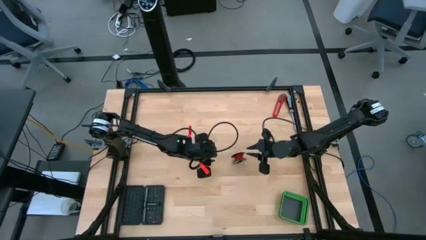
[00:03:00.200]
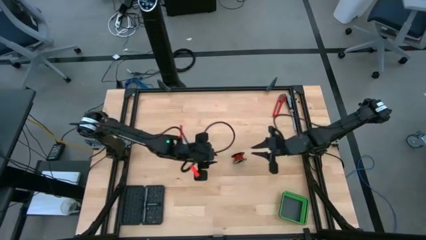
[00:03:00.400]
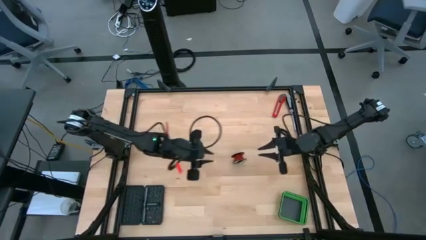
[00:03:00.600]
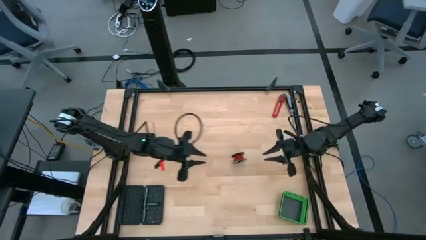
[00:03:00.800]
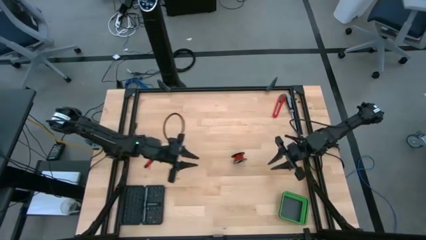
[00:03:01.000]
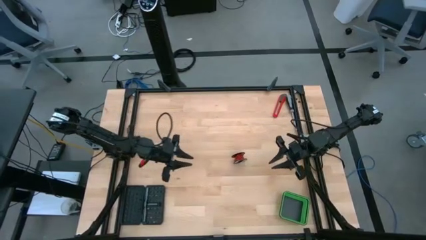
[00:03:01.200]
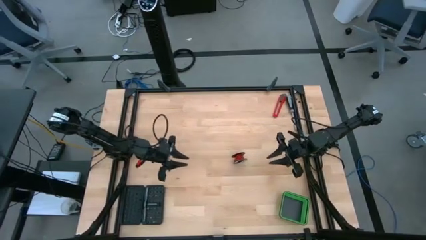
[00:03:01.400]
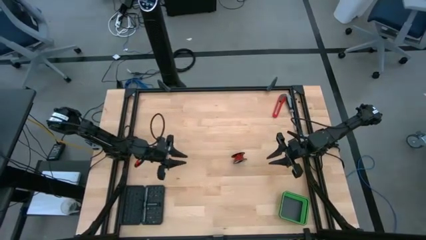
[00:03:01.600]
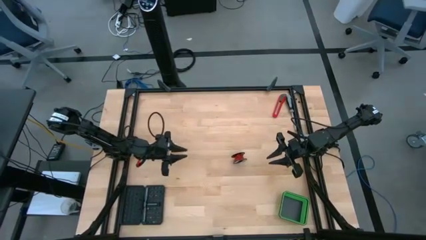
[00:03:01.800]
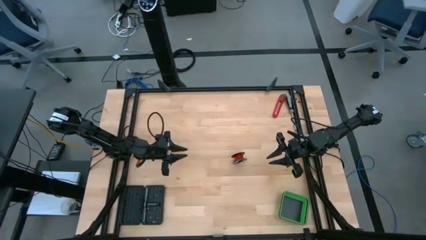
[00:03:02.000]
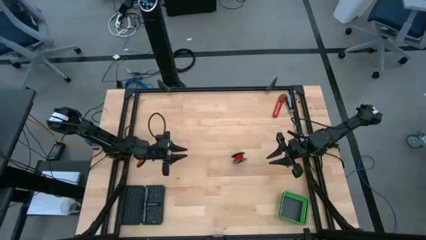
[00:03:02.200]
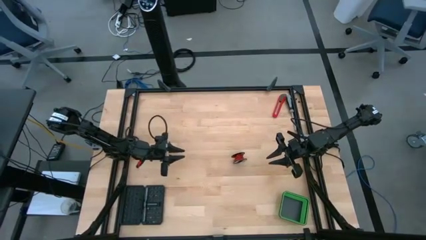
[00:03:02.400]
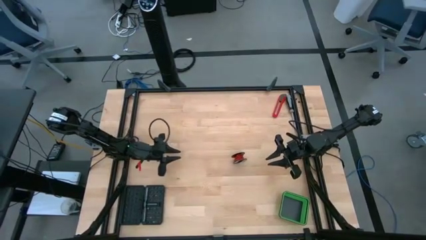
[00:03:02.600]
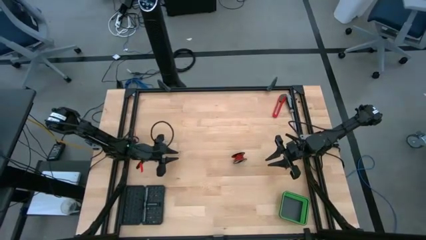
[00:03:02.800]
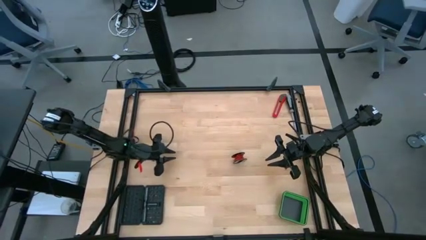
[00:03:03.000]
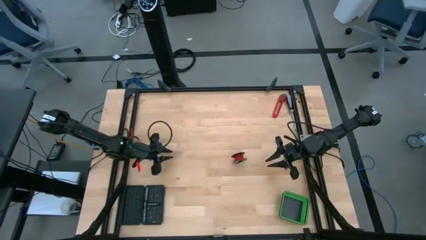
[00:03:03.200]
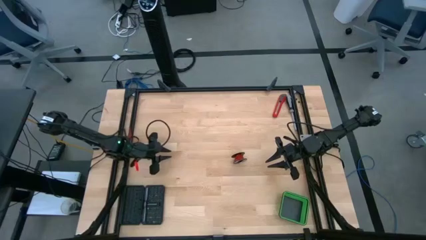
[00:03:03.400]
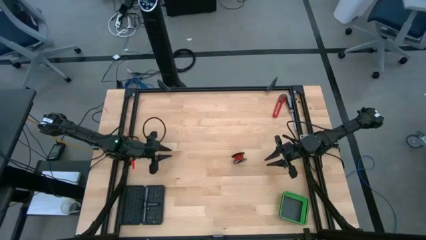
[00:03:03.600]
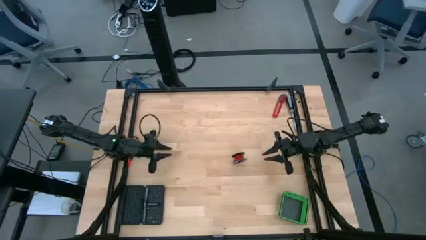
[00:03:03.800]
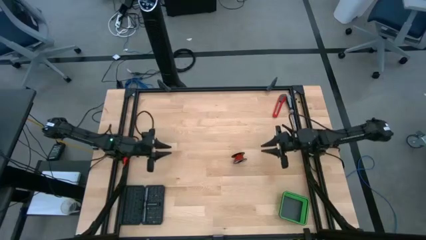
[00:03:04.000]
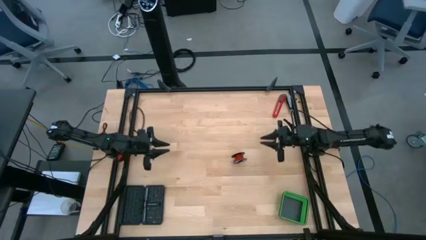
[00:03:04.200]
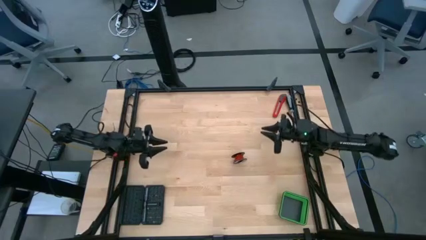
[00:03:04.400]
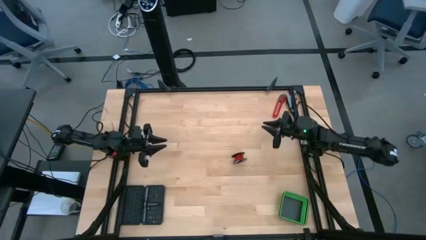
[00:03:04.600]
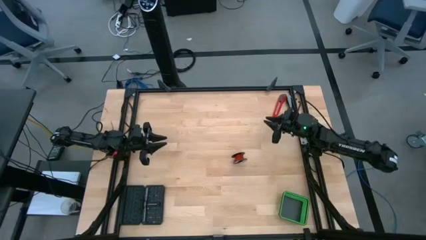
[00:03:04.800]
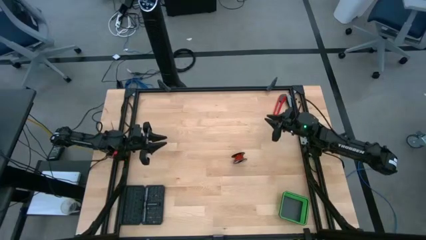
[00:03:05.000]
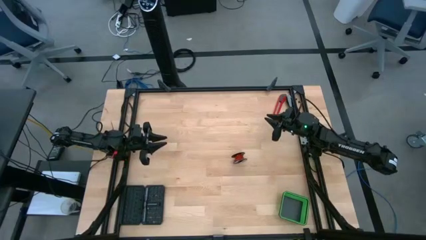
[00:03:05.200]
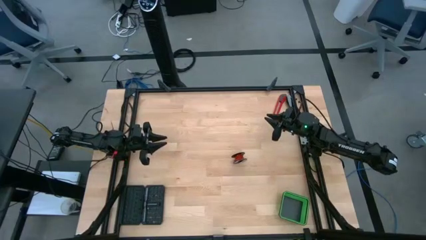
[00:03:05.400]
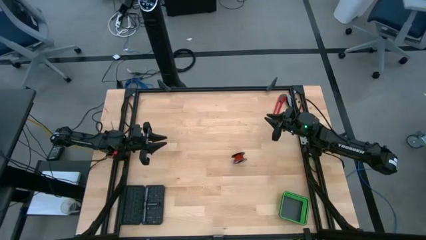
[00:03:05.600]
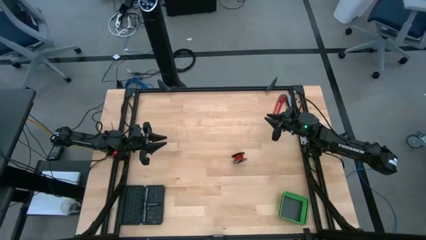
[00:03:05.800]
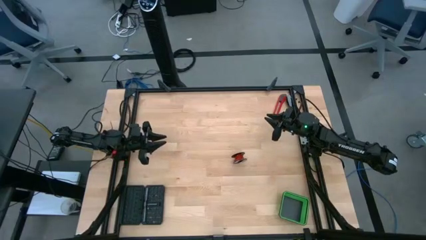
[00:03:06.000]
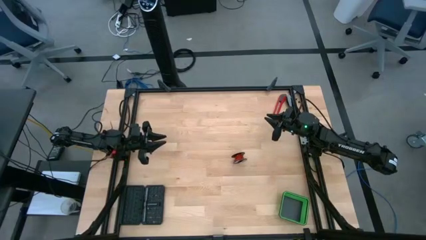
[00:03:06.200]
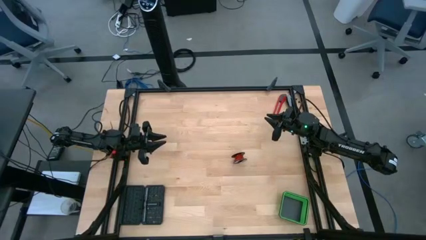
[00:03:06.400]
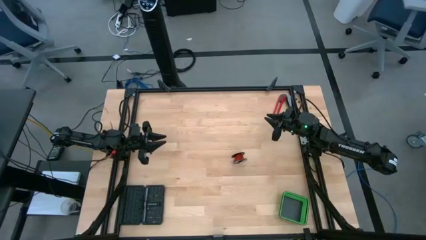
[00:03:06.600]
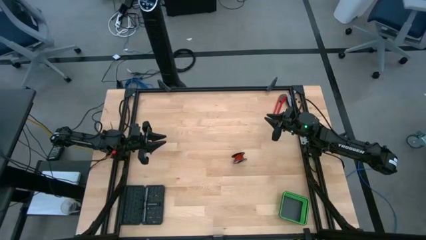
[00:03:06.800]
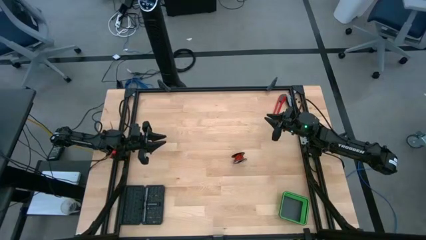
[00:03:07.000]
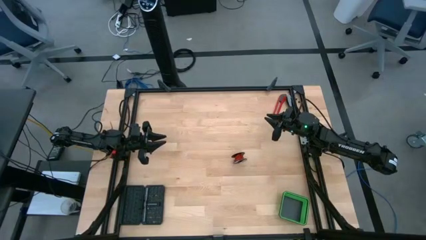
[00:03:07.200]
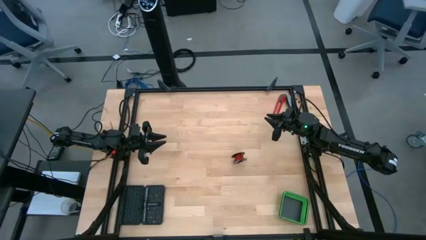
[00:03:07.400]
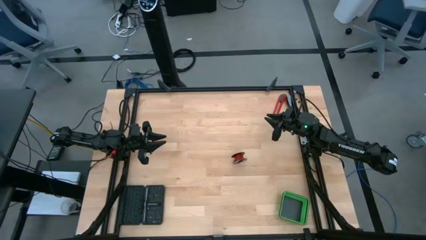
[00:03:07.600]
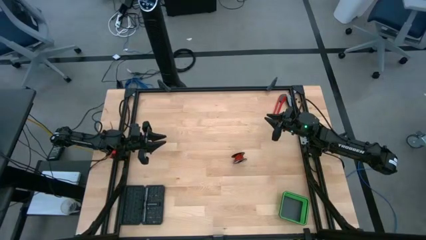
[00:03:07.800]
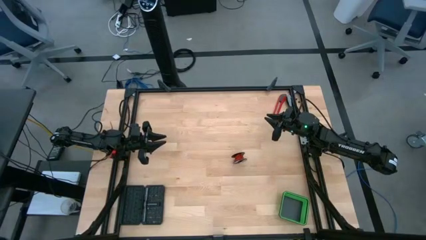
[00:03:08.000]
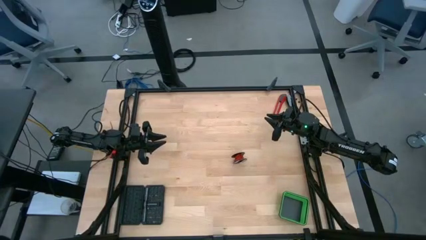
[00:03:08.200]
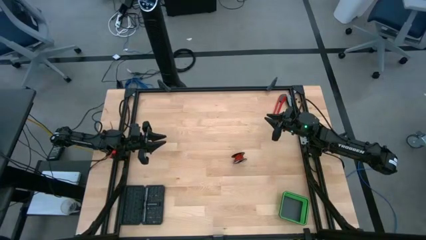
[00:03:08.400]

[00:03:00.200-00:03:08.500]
Task: Coil cords
Return to Home Position

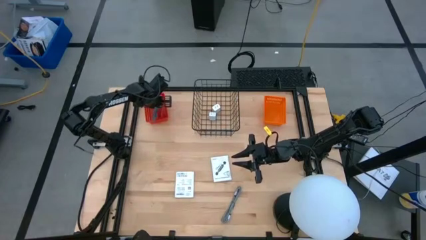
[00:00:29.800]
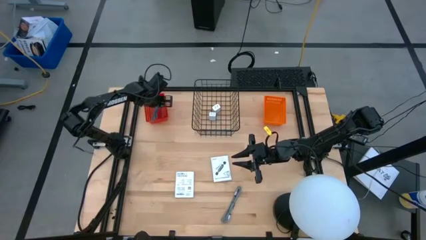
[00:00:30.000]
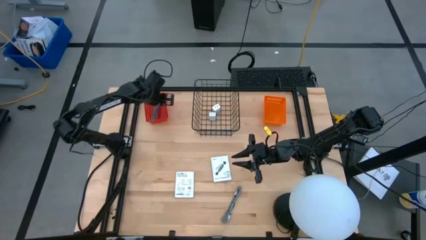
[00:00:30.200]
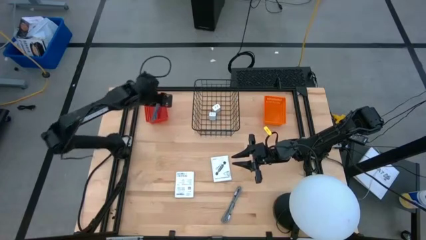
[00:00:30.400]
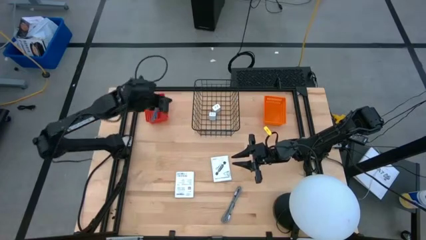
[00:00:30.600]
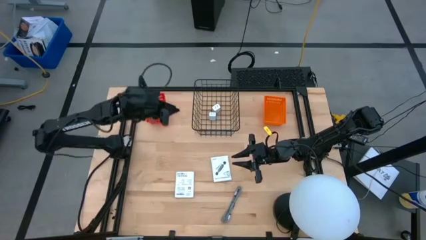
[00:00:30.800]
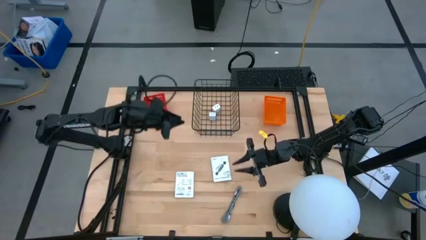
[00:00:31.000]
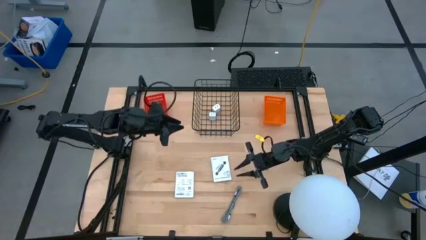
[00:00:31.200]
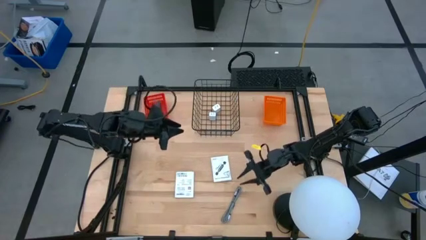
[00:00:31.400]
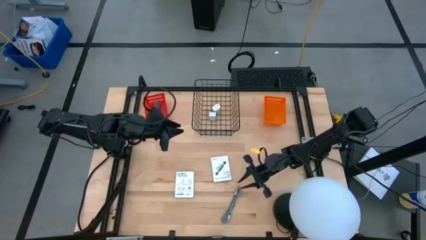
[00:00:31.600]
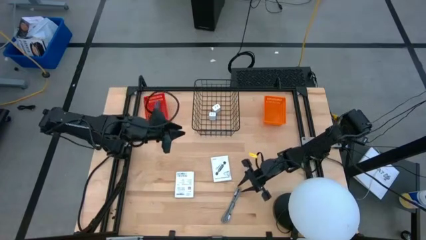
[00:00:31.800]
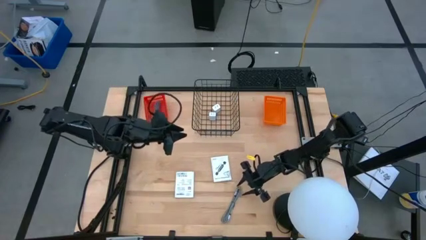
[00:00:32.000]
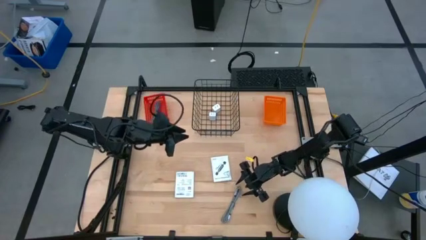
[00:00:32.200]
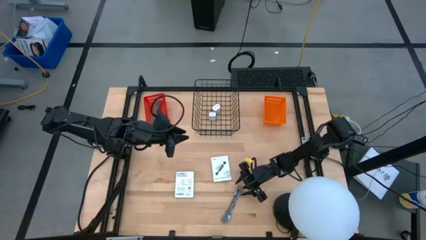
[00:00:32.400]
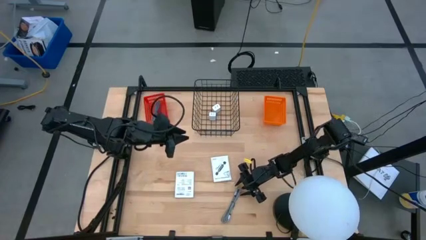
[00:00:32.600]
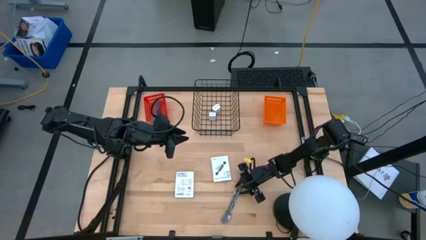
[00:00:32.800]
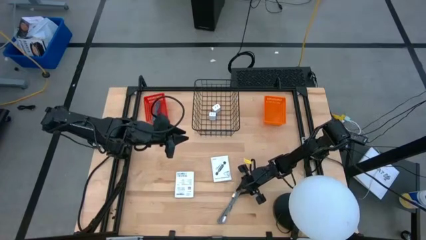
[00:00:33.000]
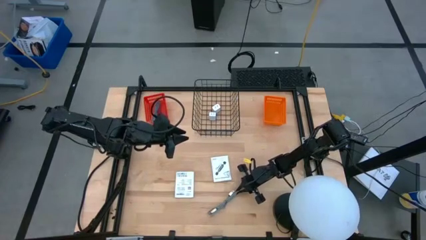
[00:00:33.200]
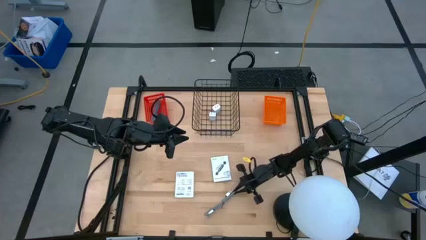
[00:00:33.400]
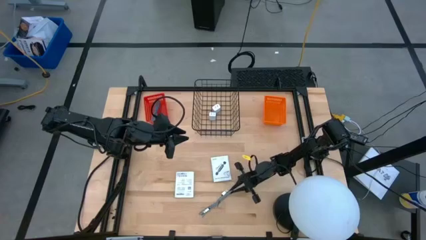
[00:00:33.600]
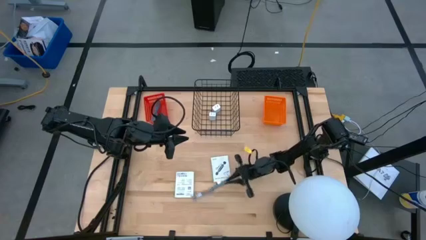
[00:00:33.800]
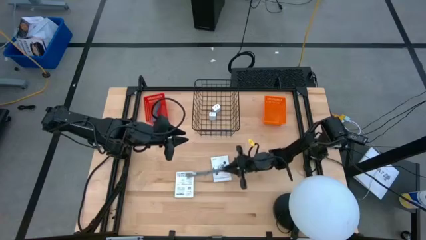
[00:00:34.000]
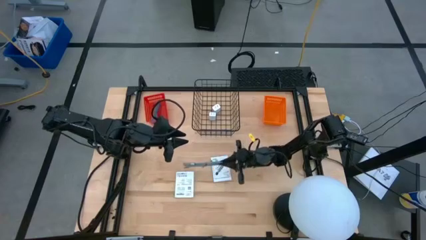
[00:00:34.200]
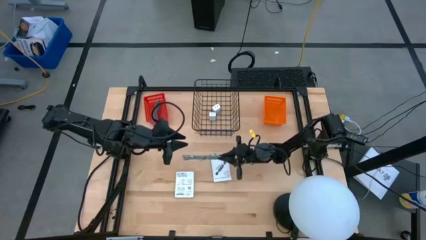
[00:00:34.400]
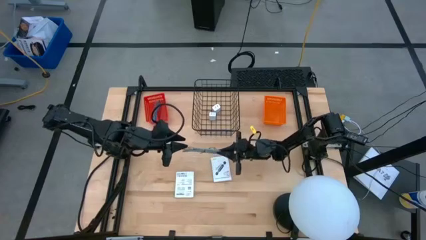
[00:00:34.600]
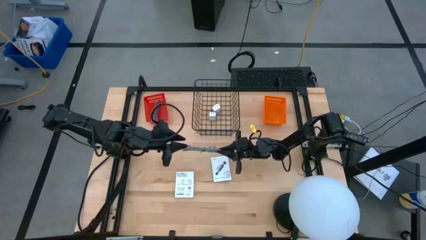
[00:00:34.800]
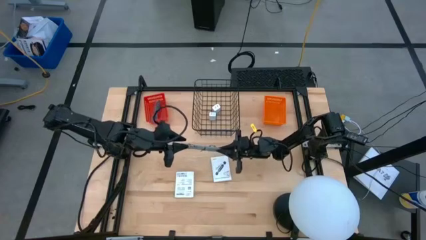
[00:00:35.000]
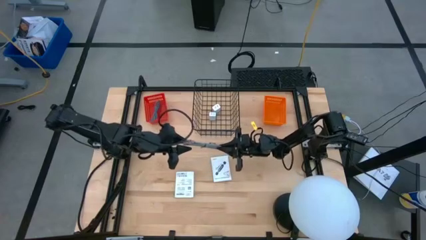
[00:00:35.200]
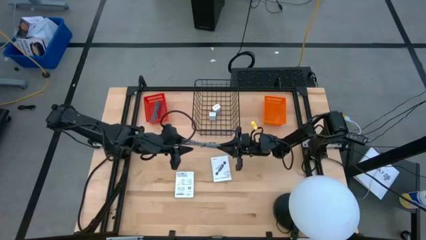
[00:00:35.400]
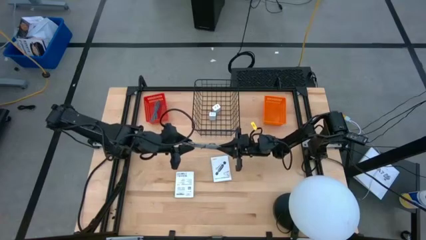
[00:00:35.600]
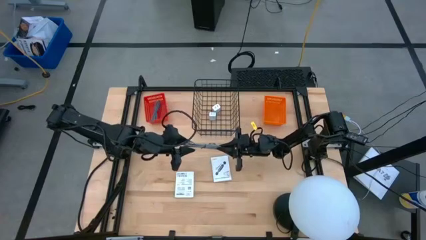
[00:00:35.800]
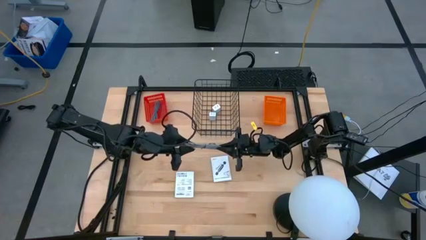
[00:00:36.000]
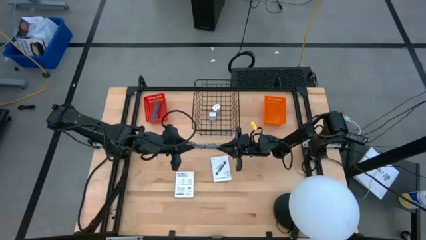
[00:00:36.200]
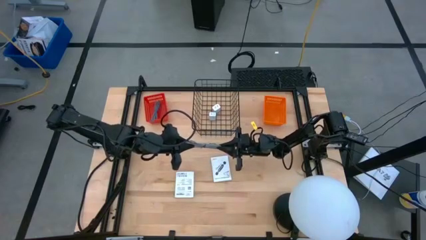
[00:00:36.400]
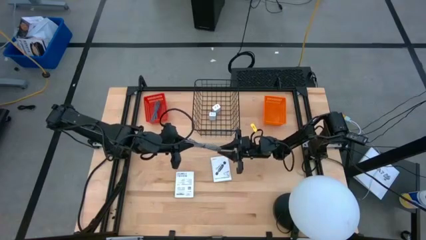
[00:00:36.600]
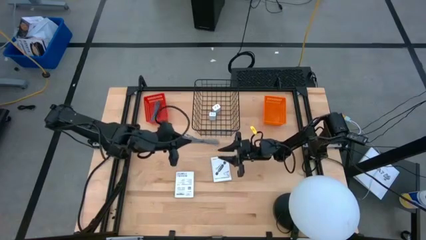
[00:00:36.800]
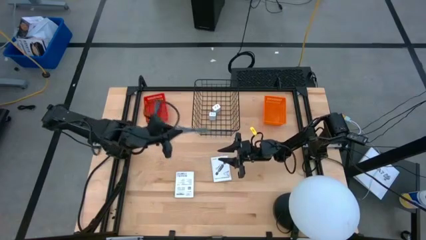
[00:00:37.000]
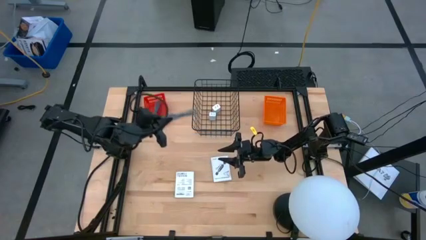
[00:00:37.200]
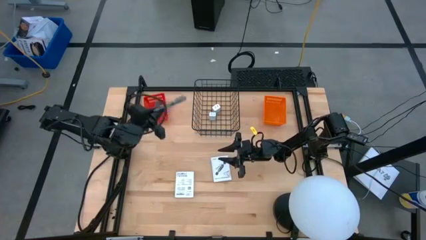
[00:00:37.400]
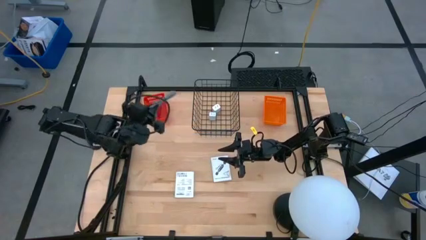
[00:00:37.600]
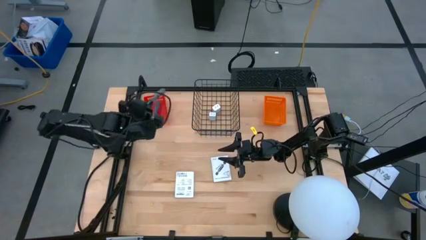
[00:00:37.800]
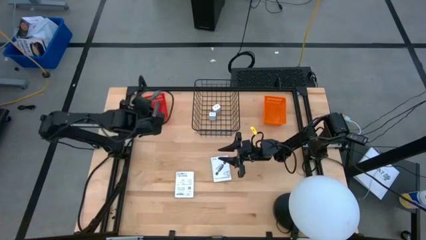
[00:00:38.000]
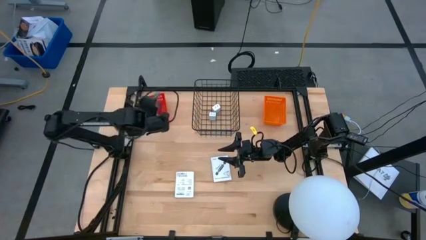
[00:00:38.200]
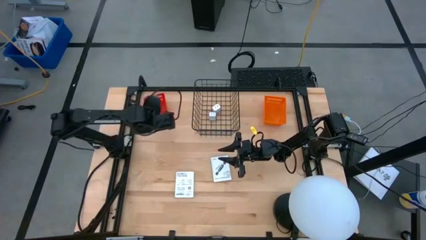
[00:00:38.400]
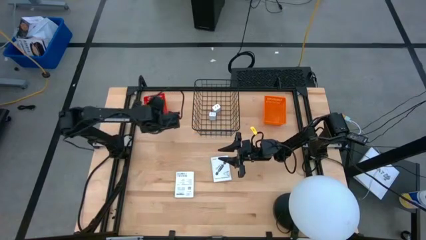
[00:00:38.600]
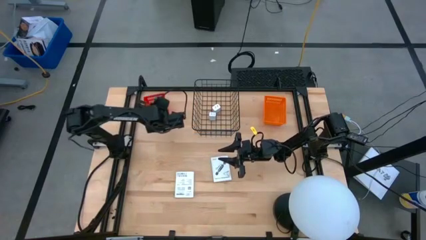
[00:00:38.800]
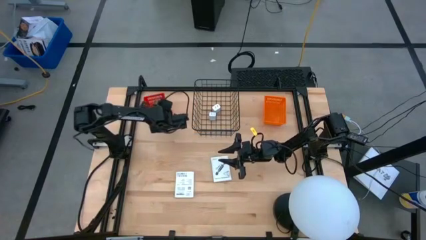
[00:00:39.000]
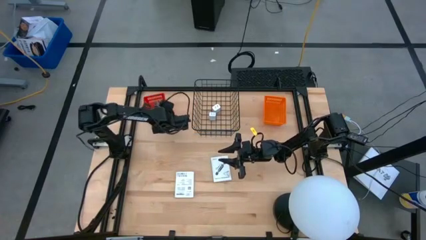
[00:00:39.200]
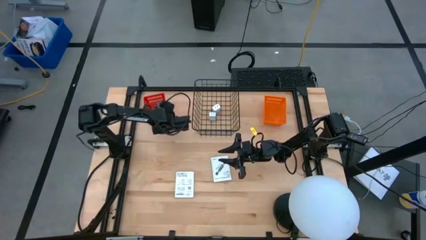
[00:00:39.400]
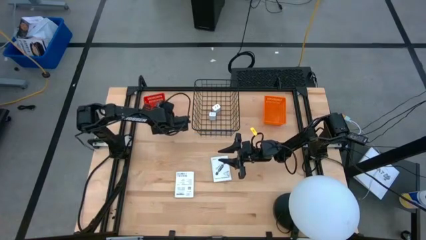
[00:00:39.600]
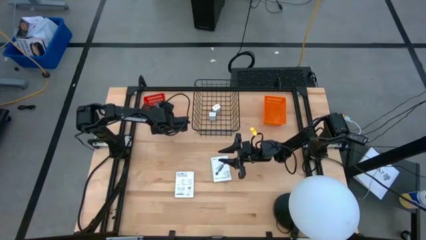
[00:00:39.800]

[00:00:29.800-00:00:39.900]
Task: Pick and place items into bin
Put the white charging cable into the red basket
